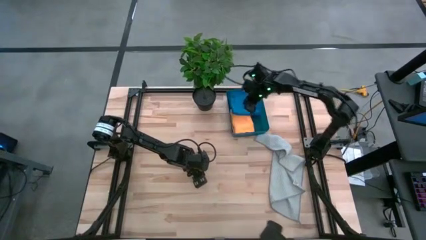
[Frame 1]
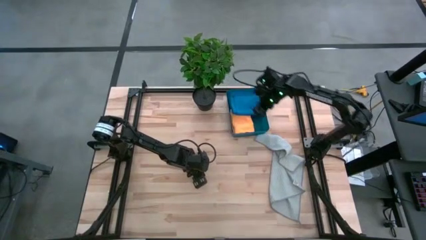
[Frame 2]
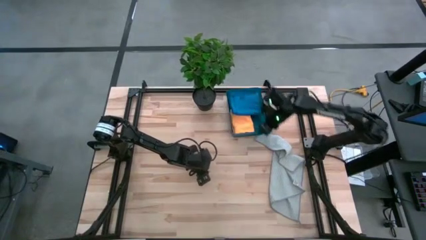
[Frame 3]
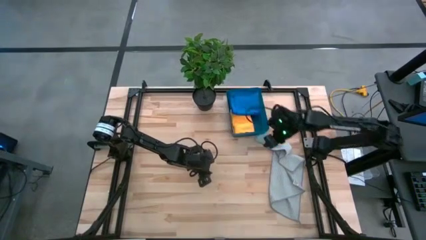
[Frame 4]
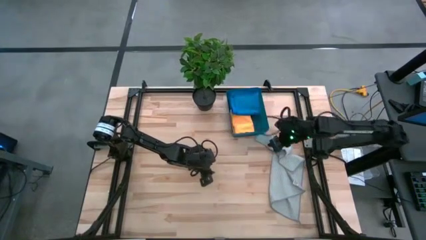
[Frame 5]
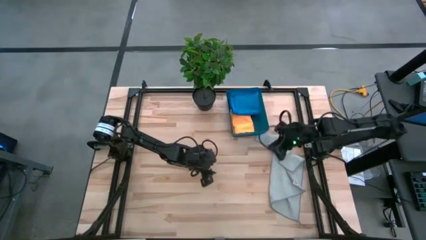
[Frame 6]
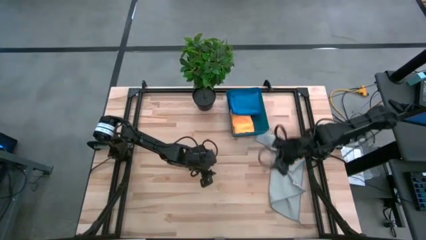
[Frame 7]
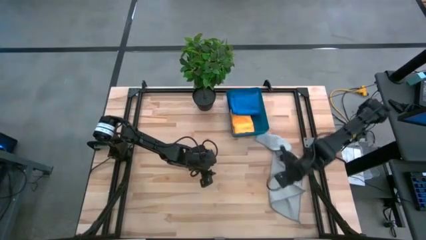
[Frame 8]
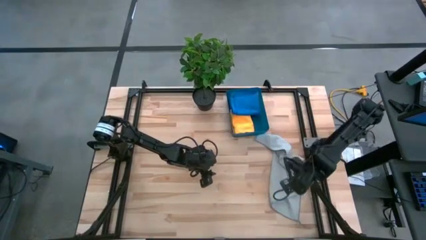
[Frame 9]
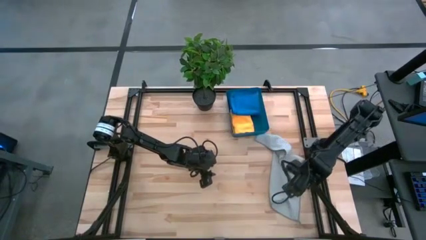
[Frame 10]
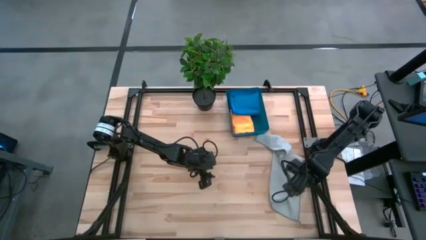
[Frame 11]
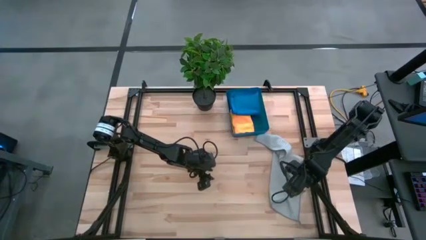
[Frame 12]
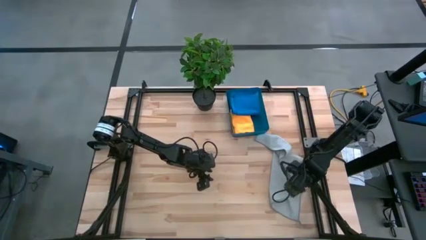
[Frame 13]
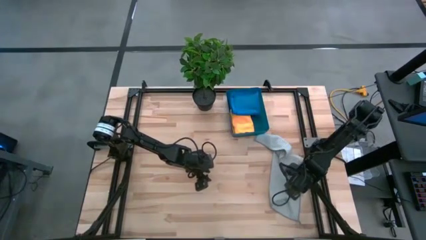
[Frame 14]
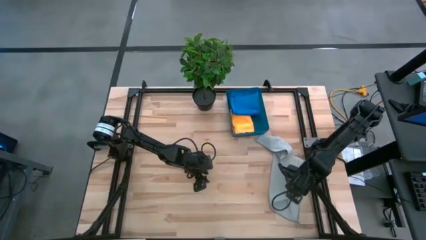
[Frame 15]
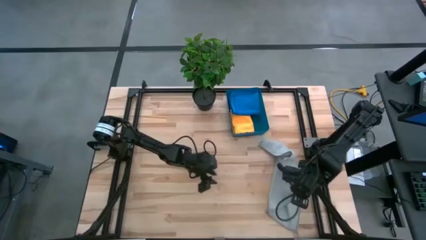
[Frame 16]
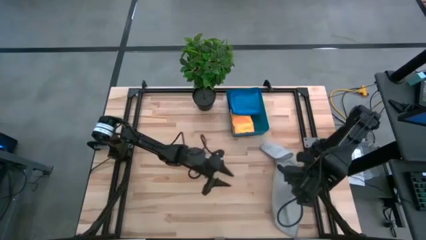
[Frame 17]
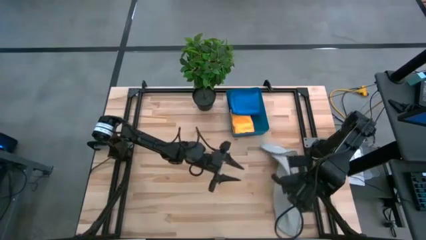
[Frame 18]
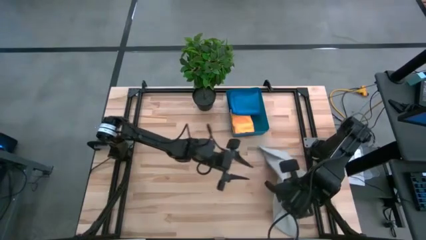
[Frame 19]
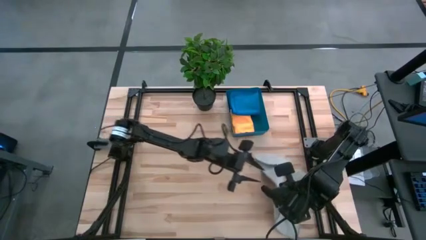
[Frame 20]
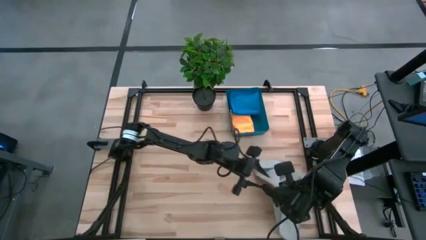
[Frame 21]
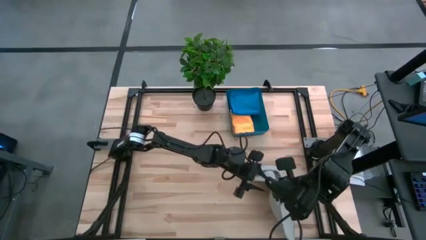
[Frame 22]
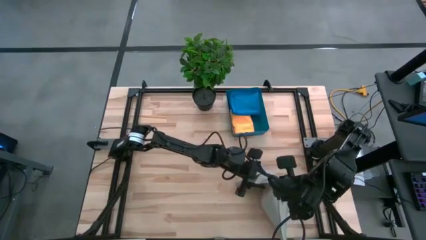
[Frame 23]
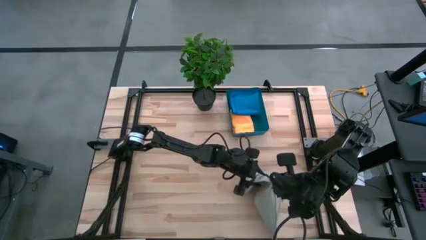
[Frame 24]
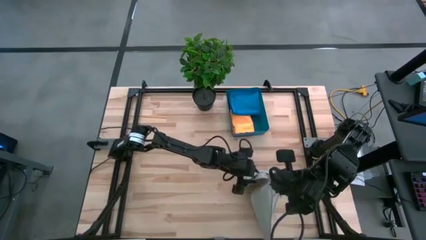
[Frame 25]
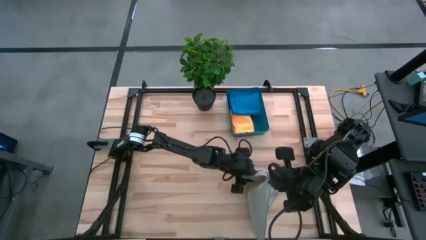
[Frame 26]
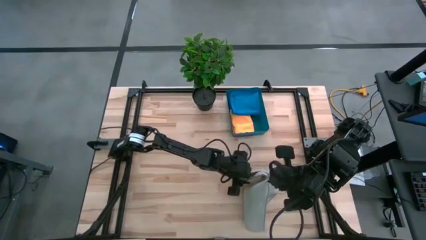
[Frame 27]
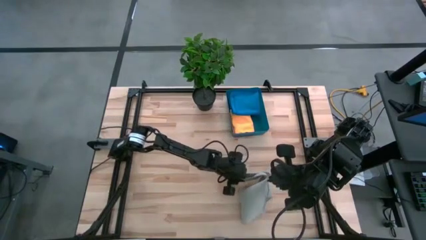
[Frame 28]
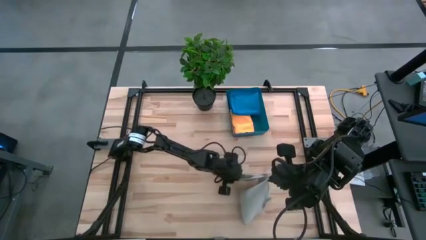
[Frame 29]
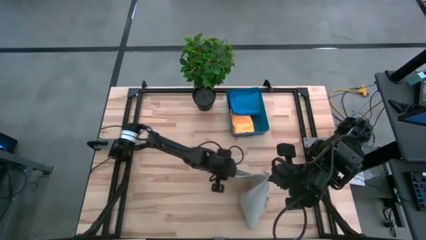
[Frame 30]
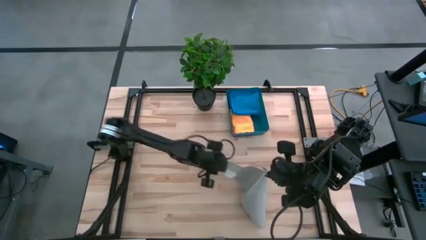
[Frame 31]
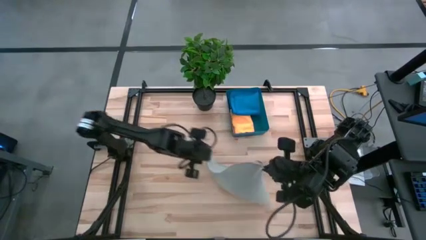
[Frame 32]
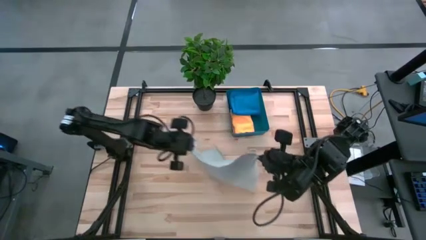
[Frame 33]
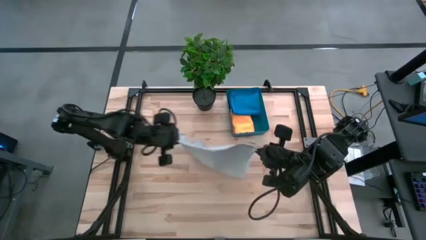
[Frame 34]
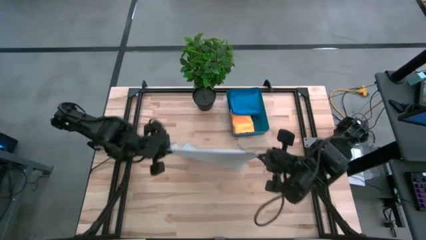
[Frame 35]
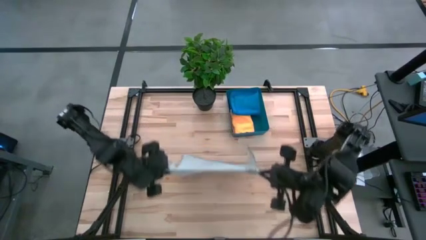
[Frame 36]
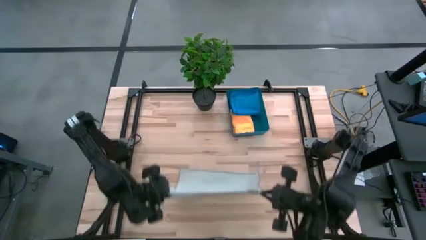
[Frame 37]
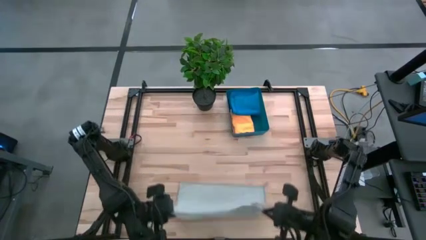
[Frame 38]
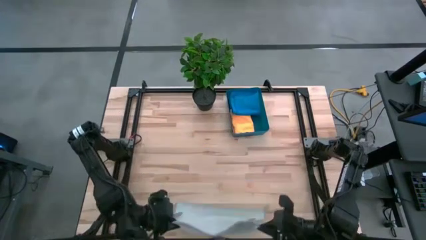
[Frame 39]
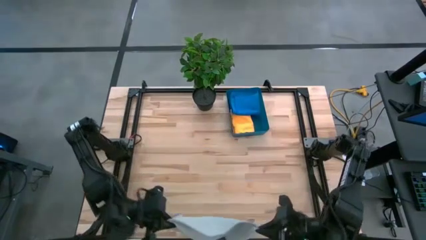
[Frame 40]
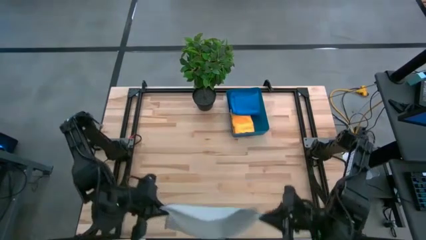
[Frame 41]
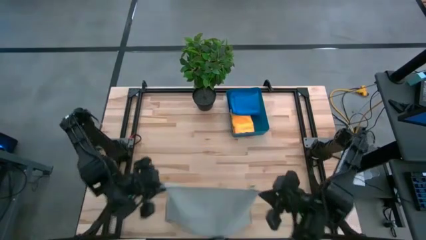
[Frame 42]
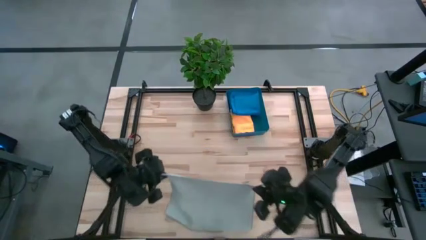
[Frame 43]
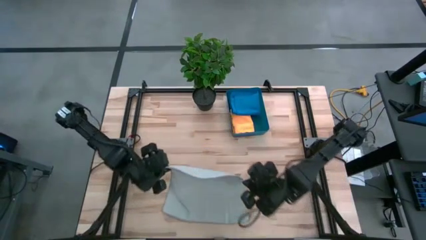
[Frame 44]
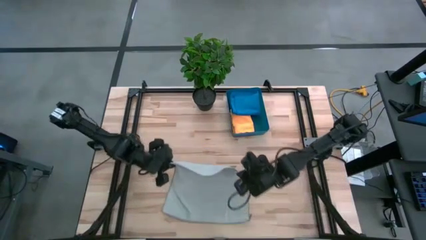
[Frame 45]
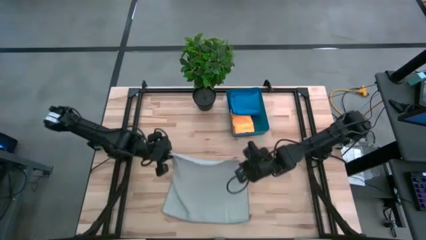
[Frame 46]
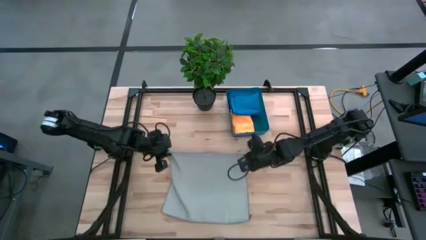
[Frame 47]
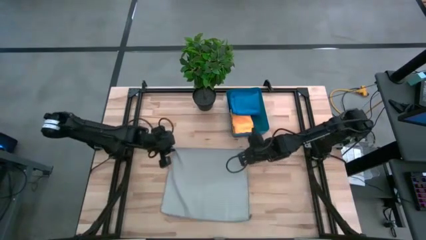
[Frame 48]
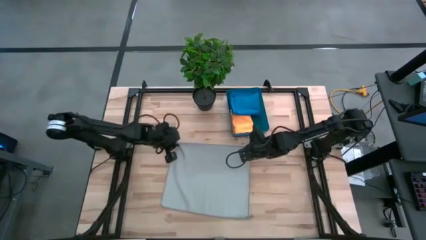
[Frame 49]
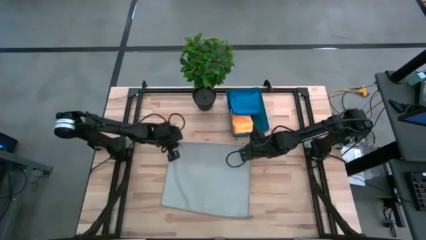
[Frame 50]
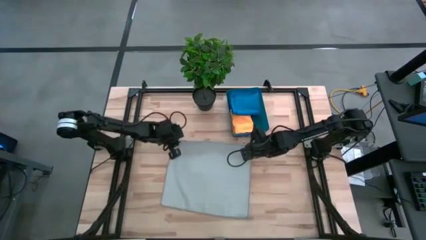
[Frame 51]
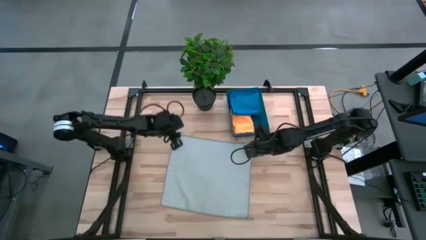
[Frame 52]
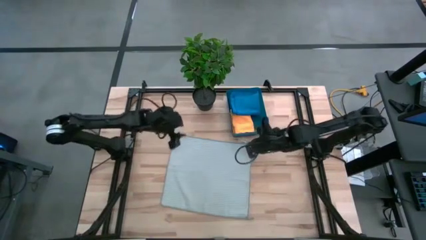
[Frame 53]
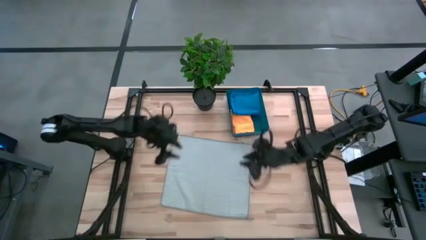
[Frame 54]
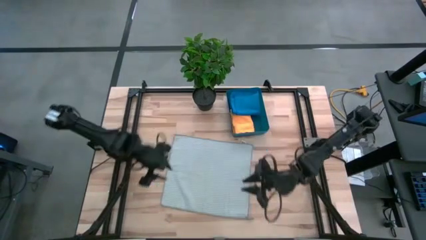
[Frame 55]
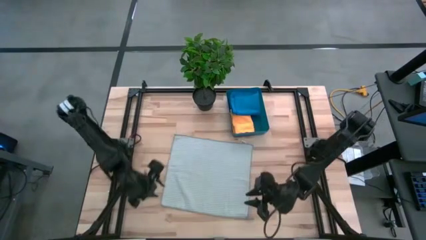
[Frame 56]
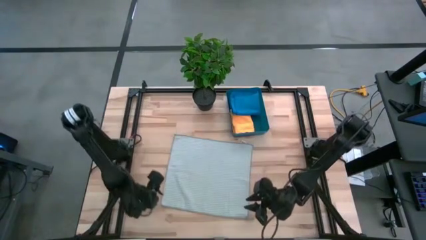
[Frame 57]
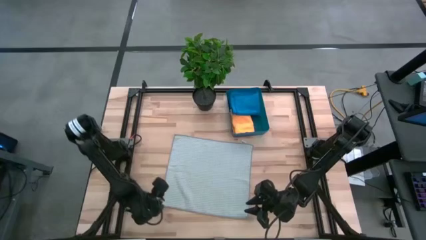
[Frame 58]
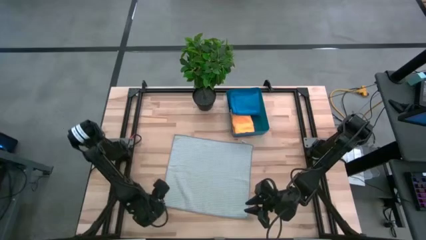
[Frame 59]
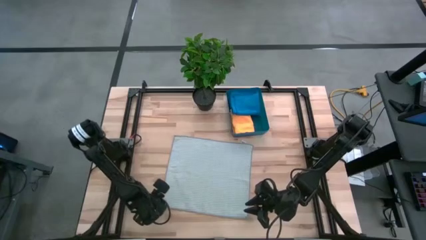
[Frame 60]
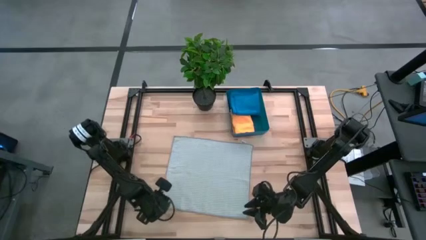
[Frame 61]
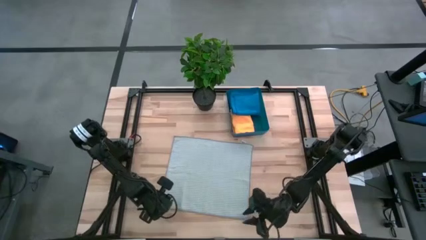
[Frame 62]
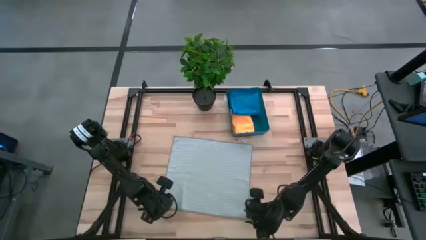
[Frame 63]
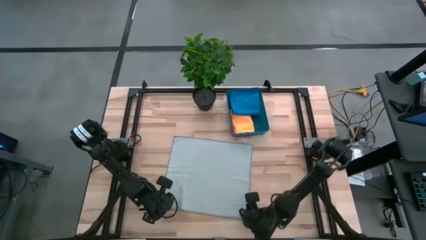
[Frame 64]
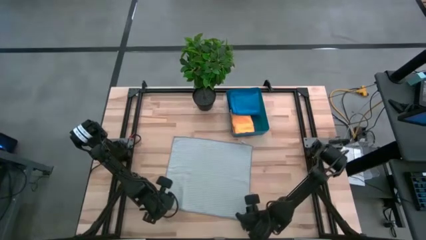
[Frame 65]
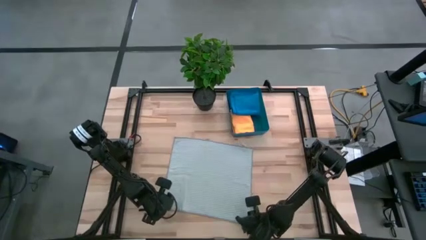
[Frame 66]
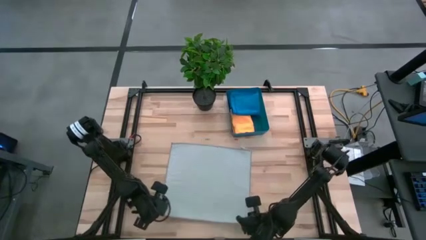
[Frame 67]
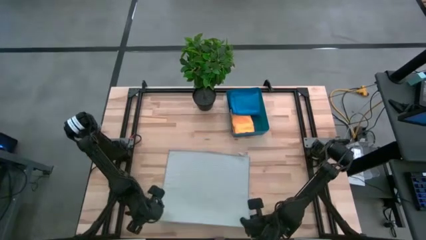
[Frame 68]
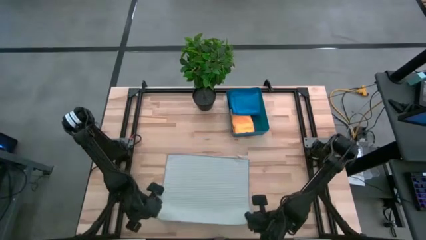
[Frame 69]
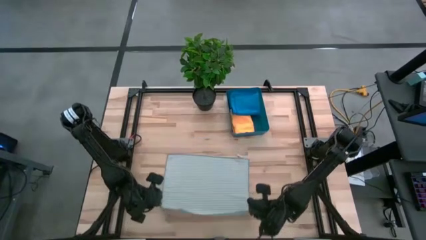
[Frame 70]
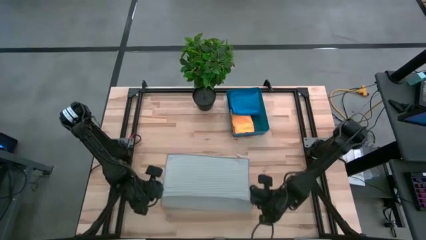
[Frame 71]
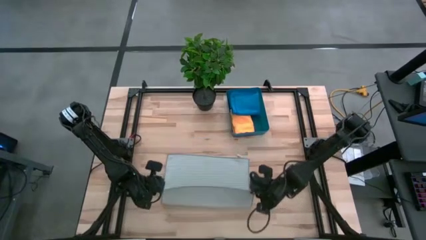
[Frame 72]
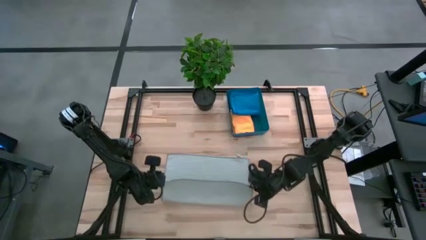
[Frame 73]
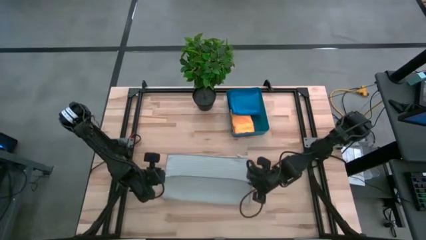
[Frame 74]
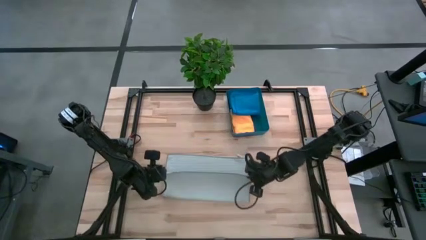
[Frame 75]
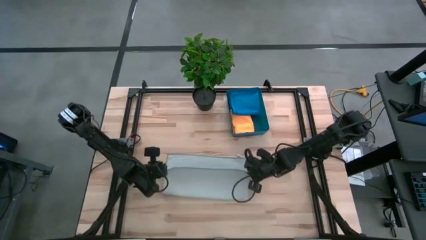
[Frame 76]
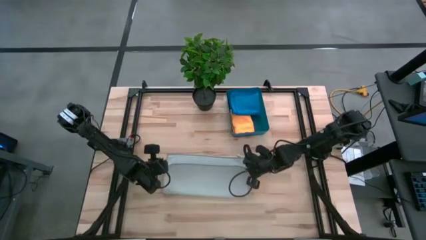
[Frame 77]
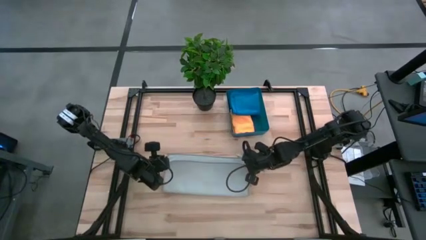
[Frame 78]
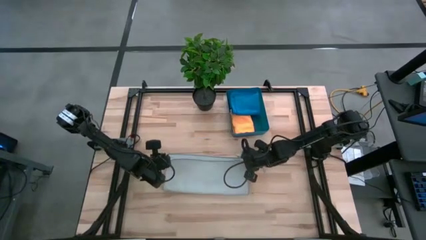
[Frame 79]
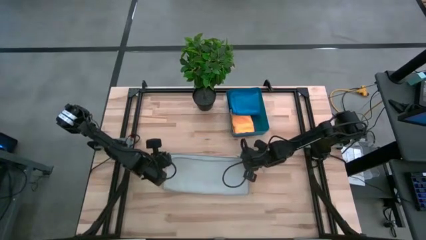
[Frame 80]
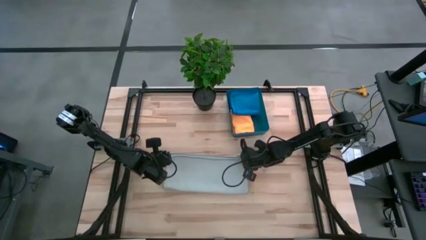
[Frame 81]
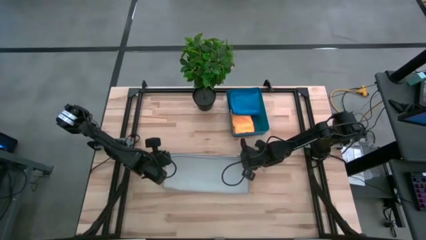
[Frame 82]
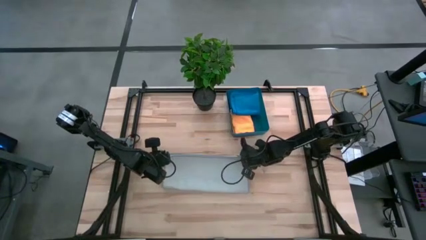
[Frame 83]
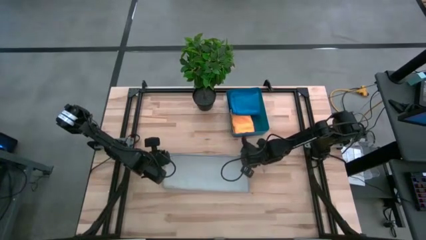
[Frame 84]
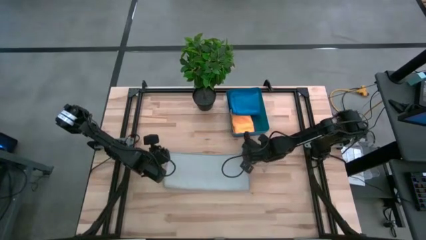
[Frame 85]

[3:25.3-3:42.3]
Task: Fold microfiber towels
Fold the gray microfiber towel
